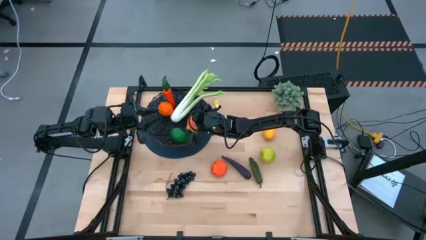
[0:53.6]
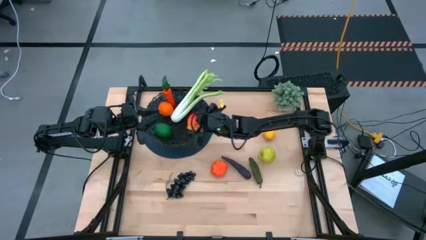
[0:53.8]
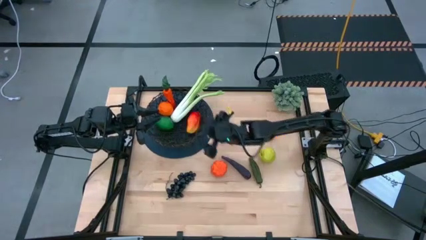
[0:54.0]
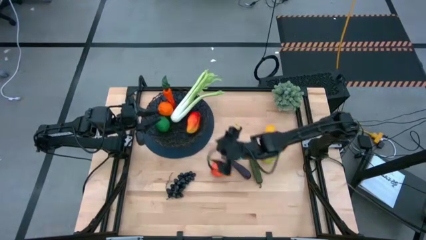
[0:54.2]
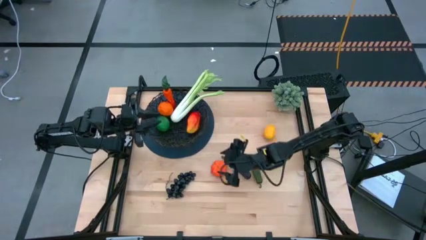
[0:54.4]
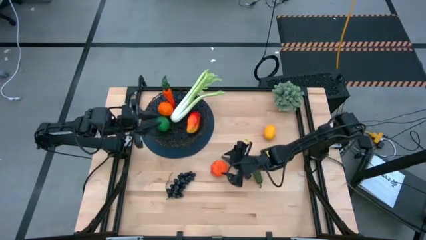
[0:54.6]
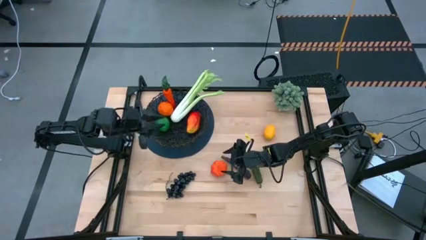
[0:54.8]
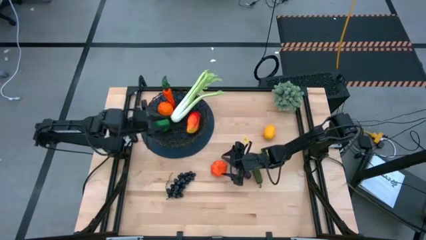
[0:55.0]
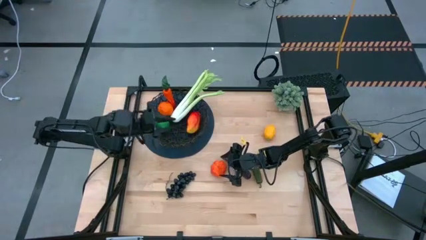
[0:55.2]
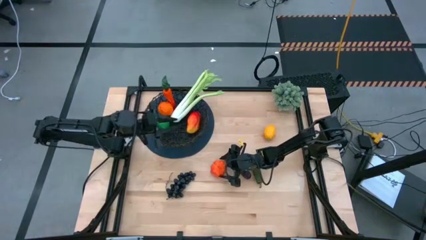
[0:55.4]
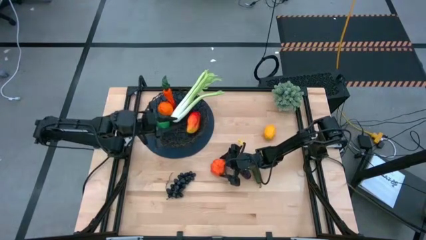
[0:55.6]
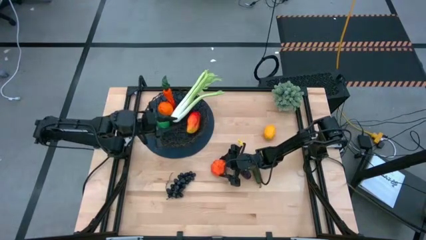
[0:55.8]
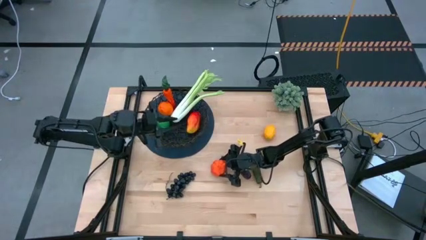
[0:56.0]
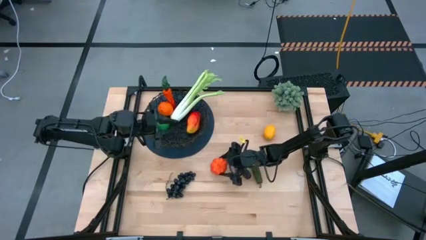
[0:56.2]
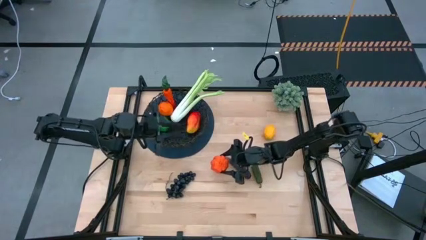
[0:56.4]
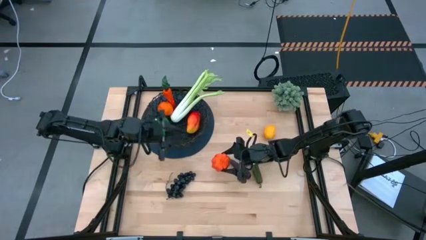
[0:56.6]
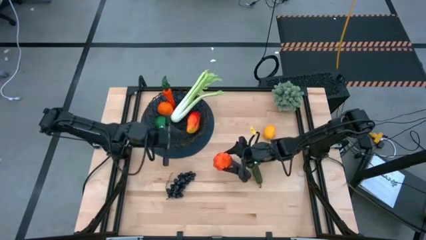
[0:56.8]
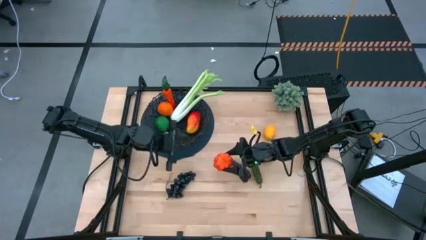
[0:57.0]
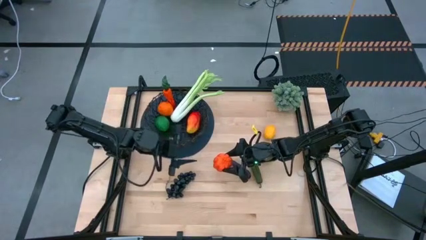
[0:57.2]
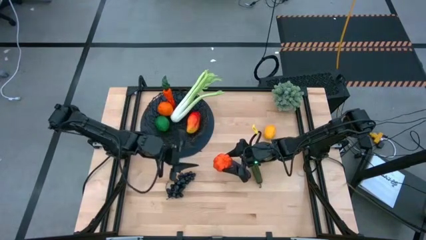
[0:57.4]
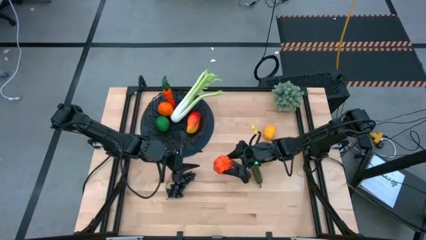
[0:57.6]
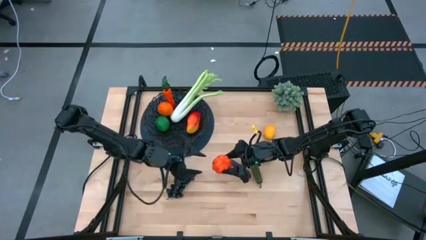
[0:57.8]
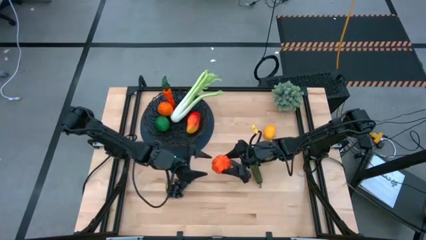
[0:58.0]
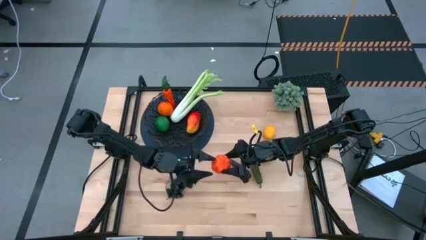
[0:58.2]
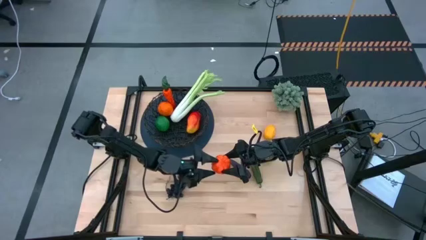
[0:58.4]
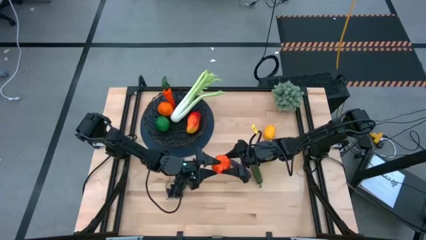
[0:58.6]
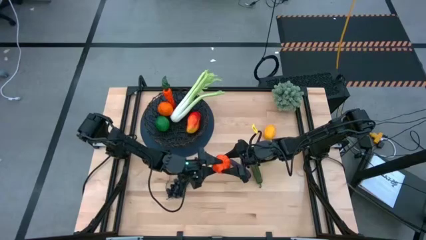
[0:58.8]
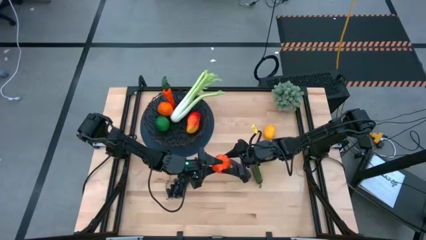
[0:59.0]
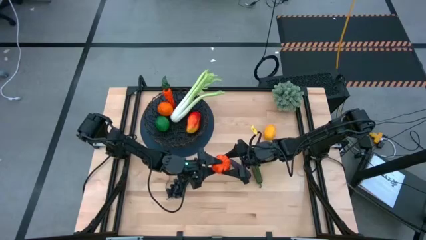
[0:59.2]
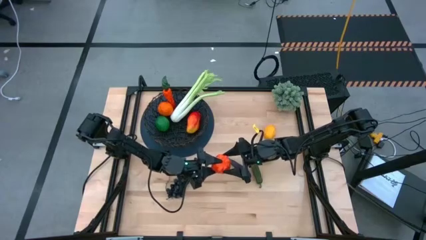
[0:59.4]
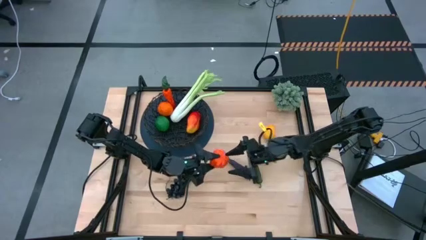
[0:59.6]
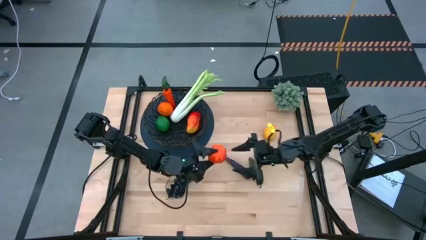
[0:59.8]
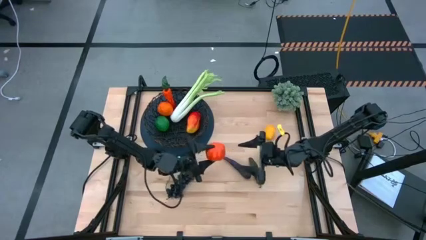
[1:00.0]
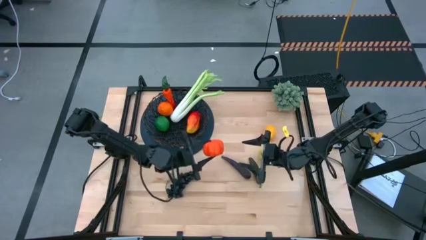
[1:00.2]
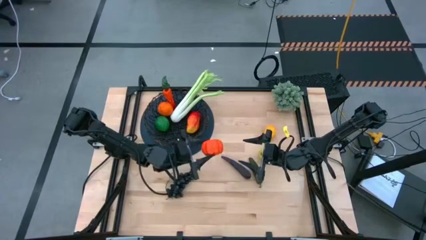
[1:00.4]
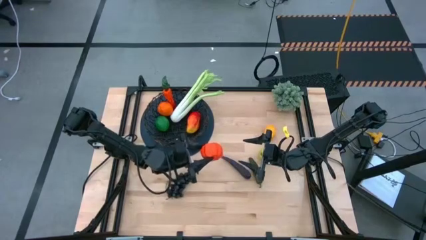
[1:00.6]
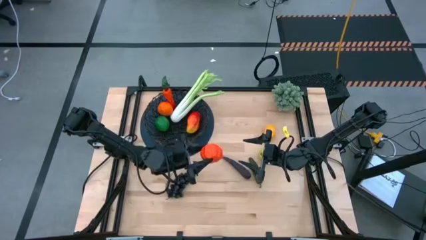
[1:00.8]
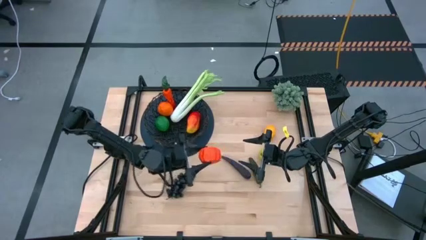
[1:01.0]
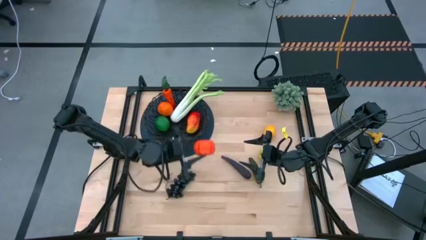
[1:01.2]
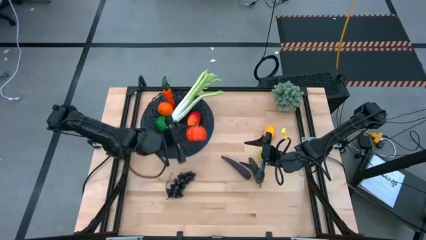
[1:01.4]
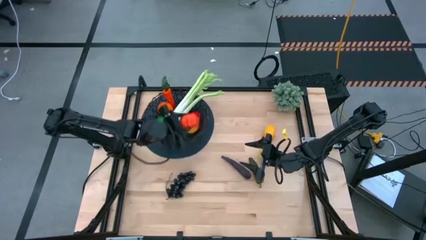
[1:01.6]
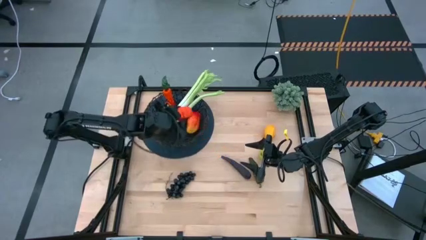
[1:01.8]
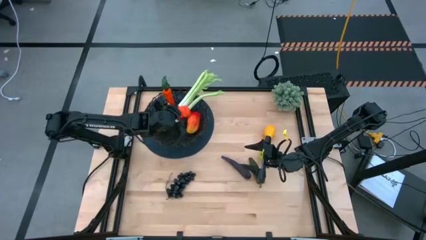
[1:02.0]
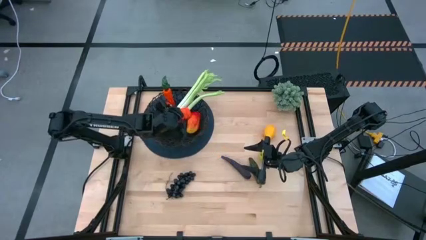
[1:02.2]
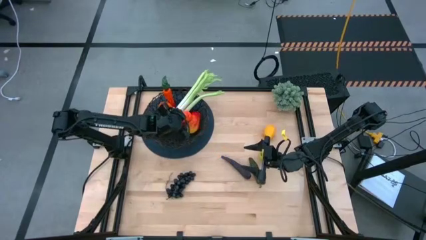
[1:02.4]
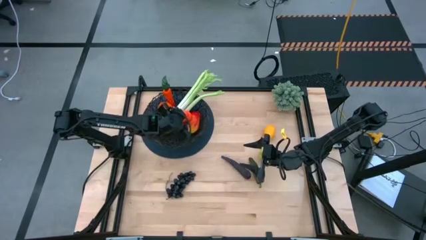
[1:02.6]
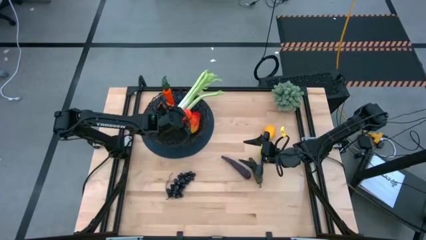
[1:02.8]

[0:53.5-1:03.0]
Task: Build produce basket
Put the orange pumpkin into the black basket

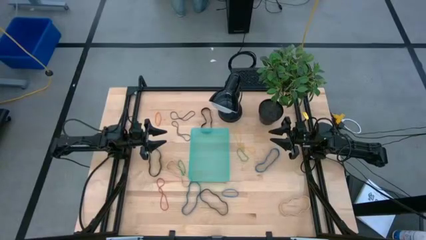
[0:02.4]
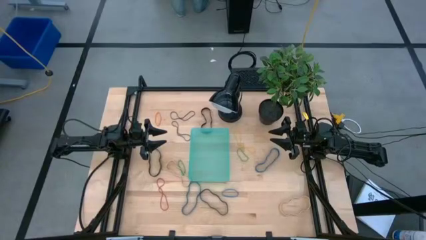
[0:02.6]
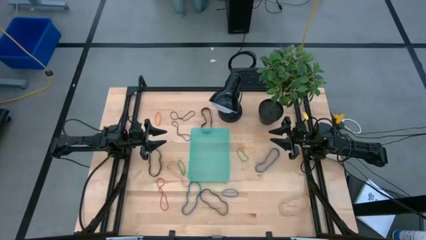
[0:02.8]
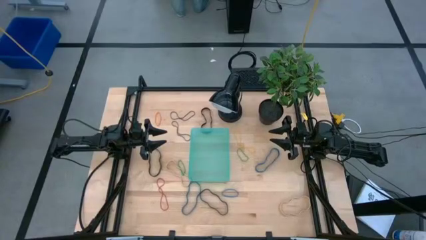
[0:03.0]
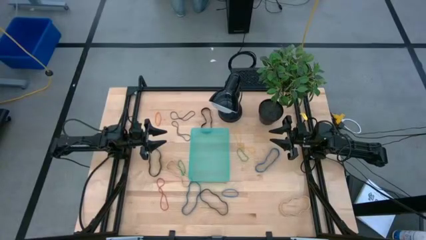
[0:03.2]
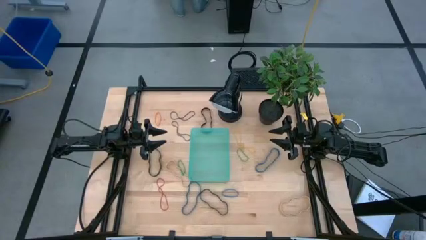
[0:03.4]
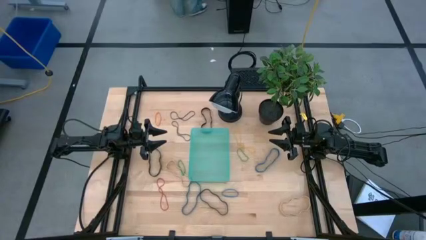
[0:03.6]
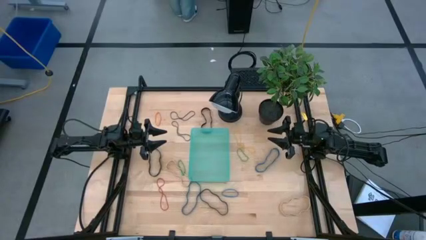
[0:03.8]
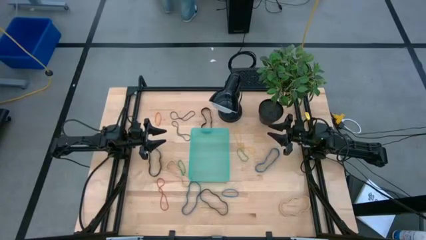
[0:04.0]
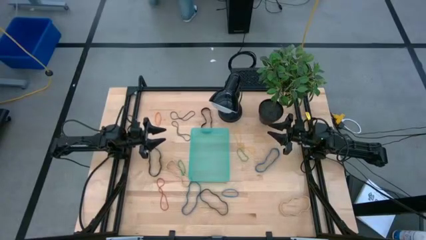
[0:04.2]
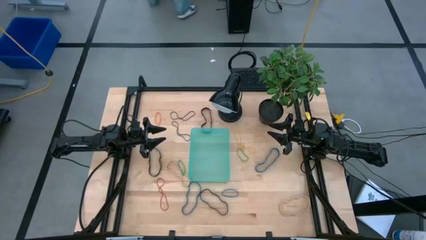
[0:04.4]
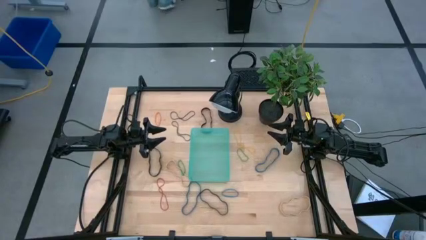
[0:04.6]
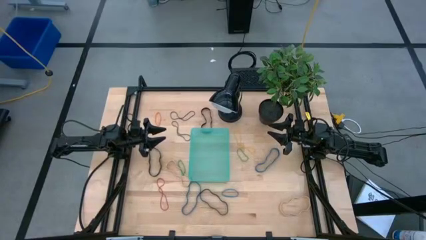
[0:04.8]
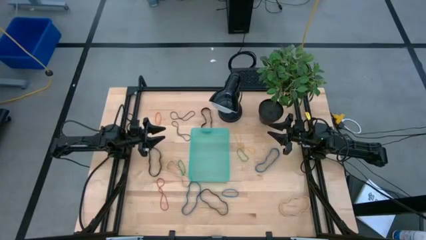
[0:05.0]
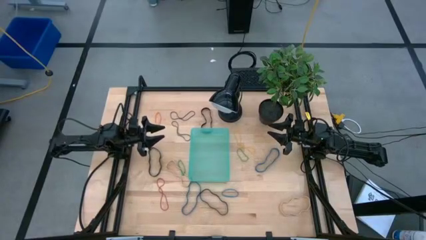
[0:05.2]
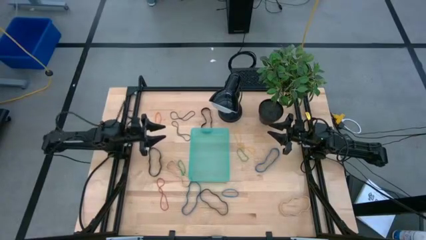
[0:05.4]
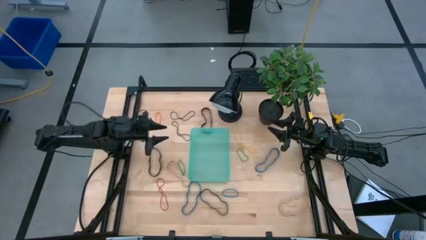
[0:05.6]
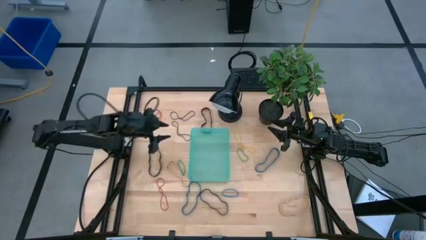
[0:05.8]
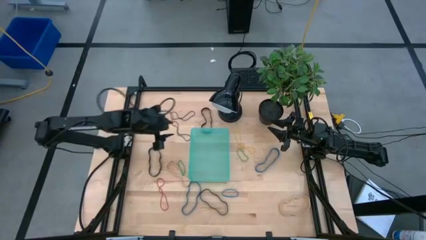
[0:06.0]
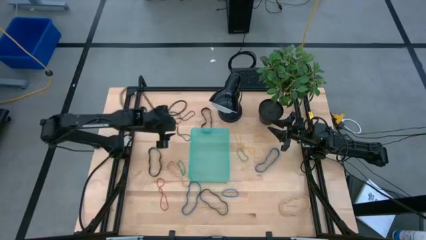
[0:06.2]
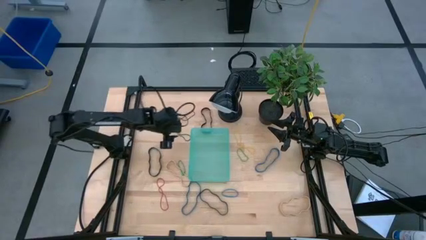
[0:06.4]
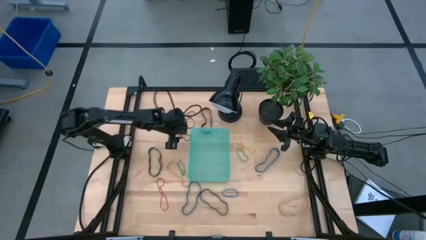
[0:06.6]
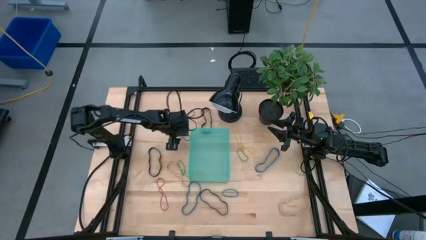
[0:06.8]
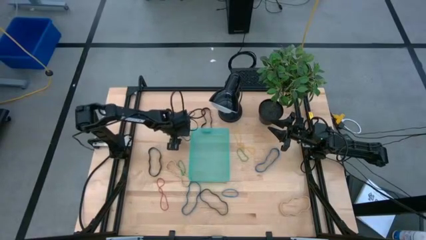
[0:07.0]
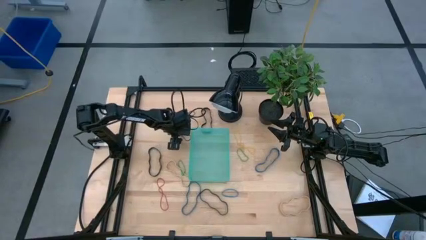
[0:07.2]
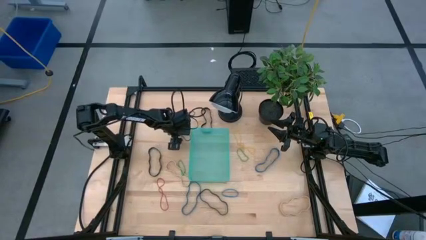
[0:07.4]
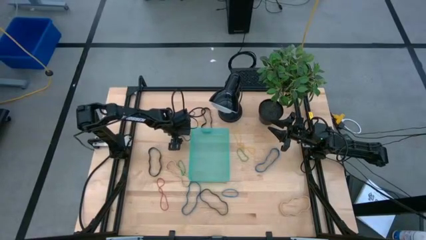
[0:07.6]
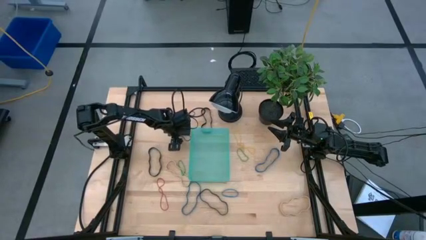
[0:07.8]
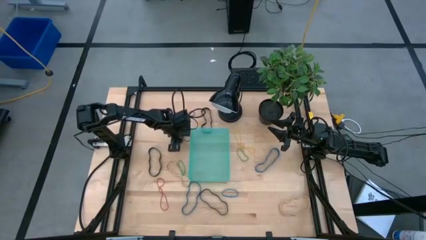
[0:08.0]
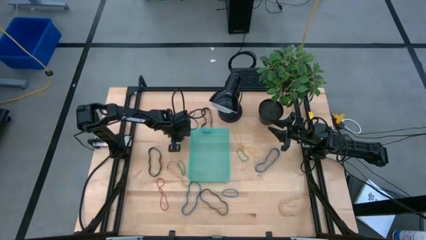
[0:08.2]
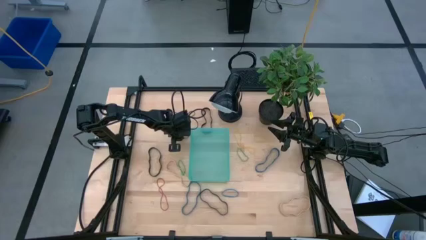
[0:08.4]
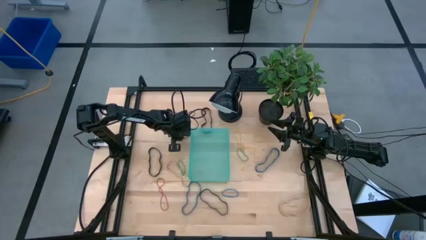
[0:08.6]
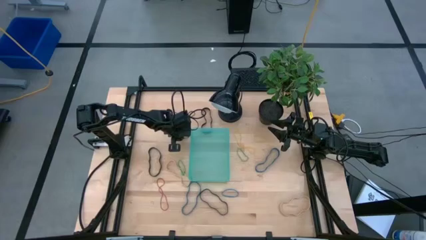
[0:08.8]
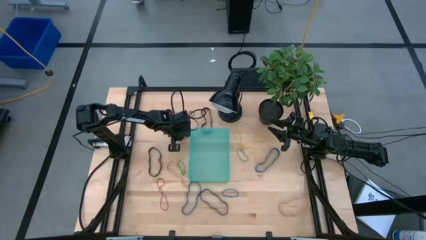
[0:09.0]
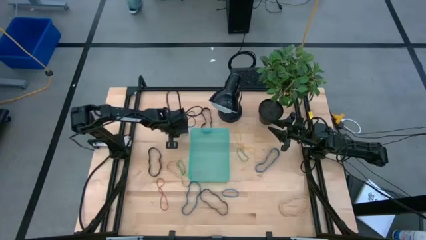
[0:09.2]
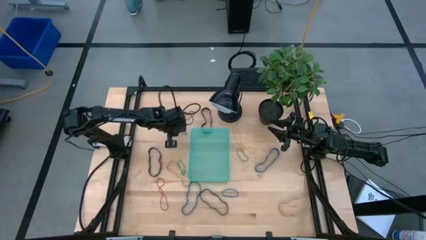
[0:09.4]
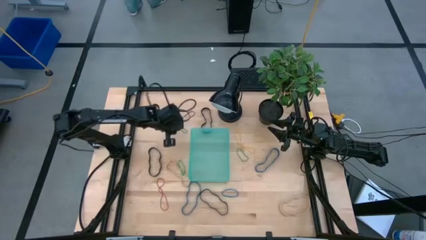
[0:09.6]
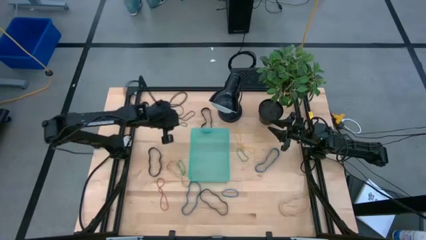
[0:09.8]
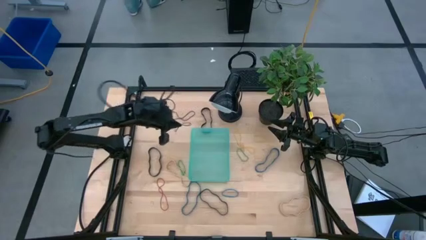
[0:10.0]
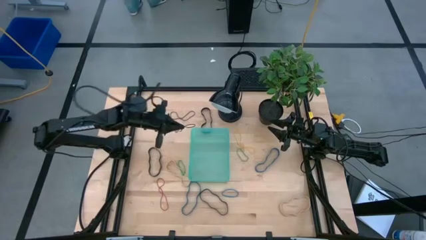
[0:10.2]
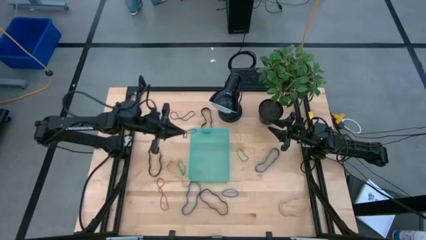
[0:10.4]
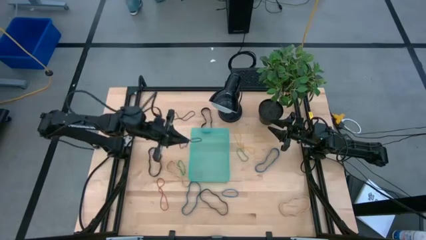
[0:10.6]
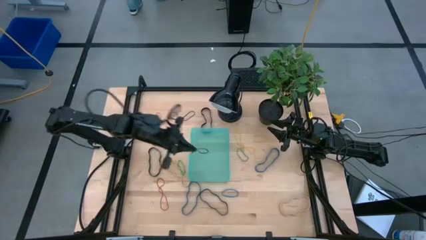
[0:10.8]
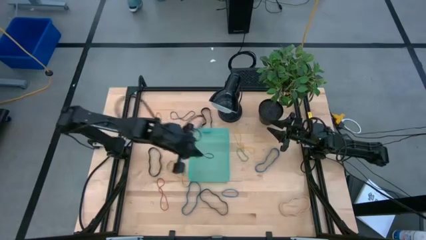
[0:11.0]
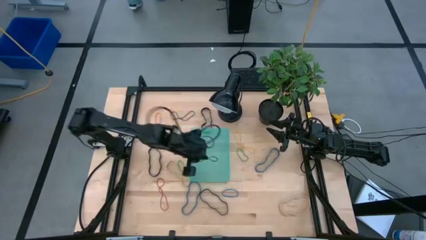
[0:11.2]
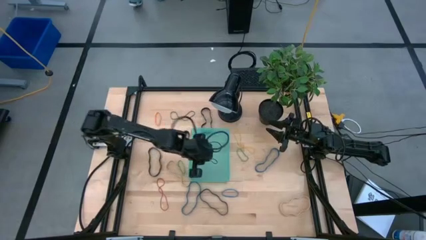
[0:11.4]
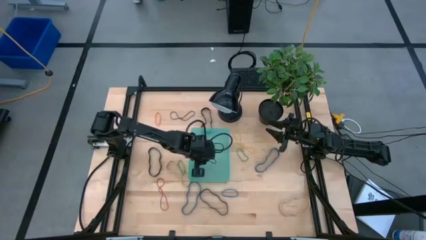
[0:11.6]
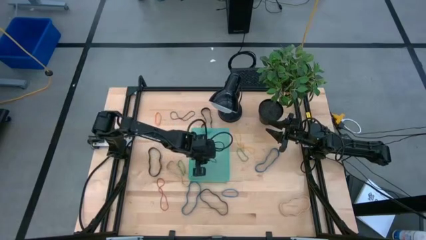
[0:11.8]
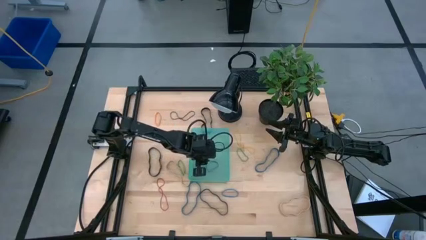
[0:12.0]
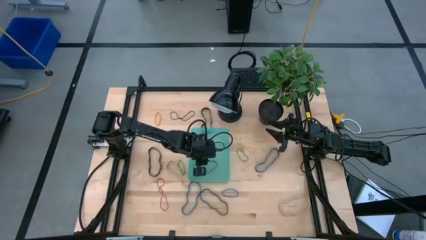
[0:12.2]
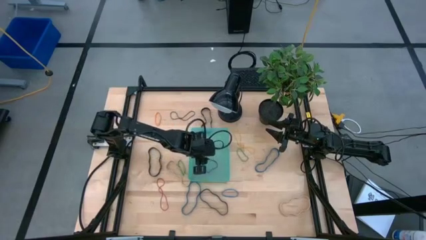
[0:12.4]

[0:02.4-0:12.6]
Task: Pick and place rubber bands into bin
Put the bottom purple rubber band into the basket
